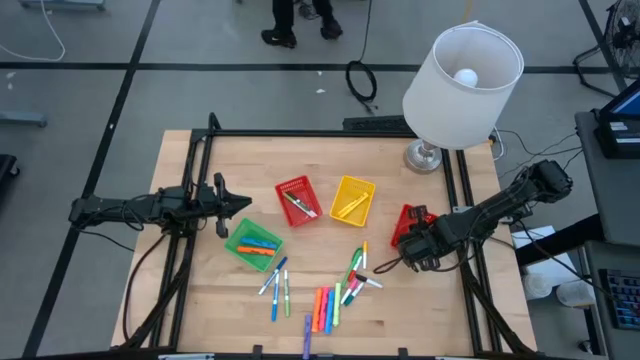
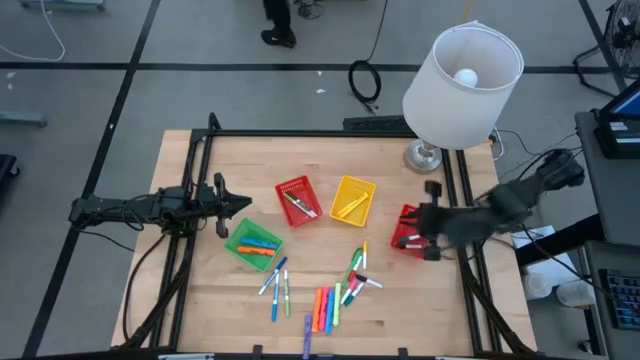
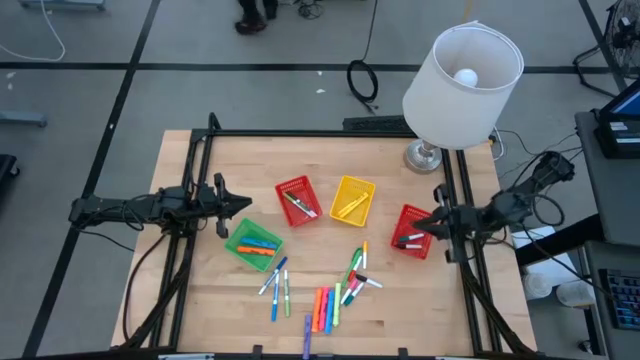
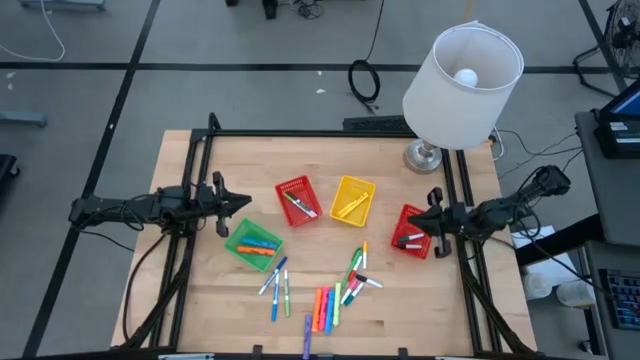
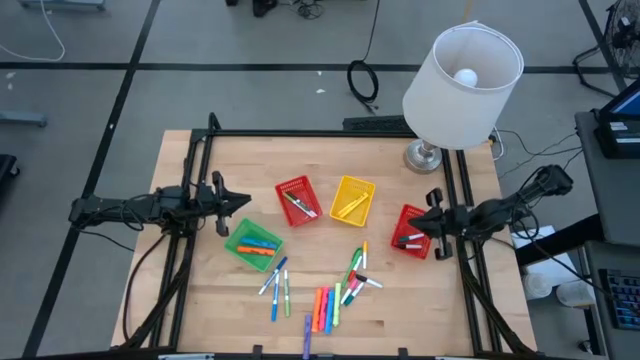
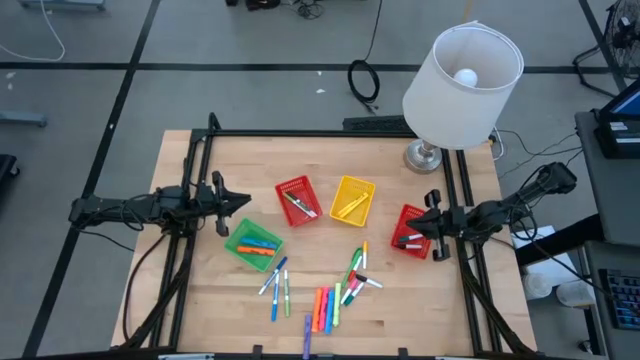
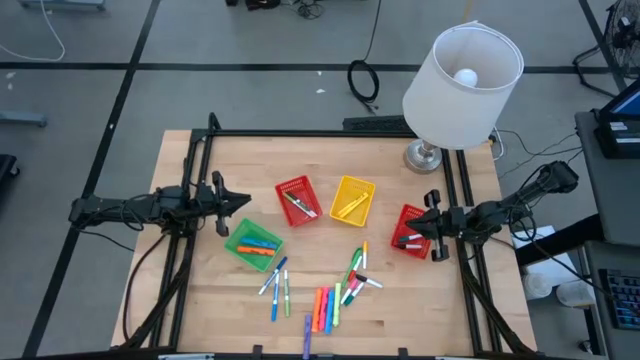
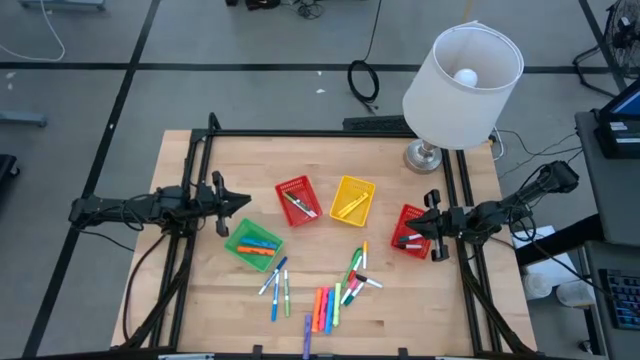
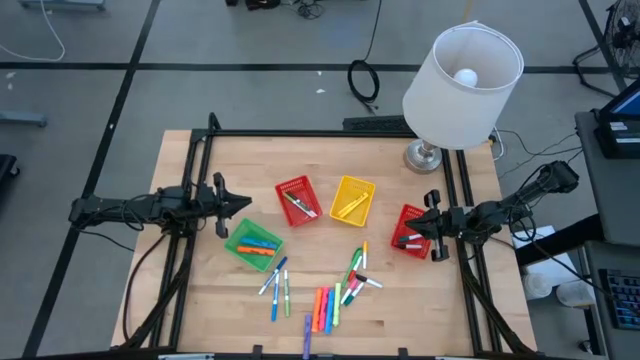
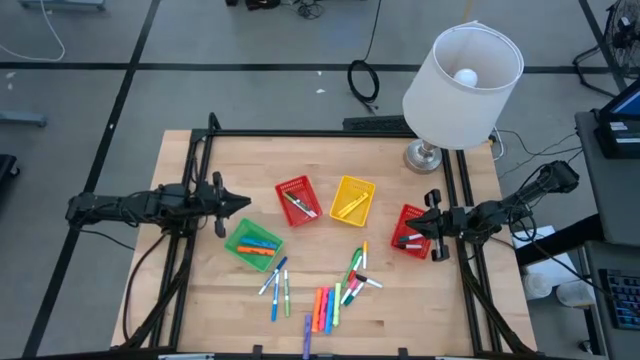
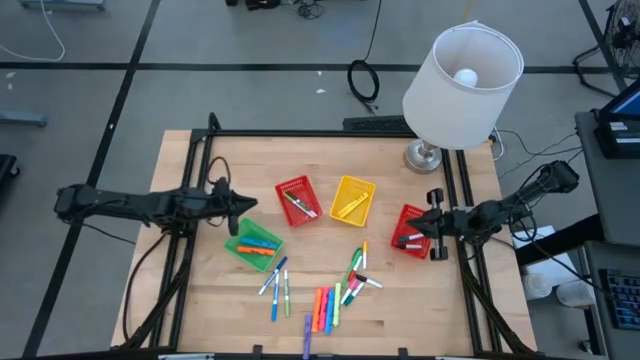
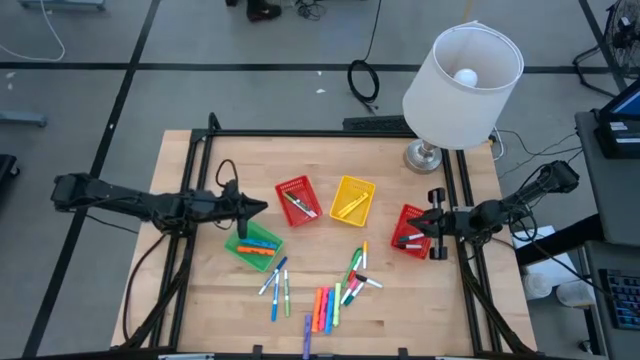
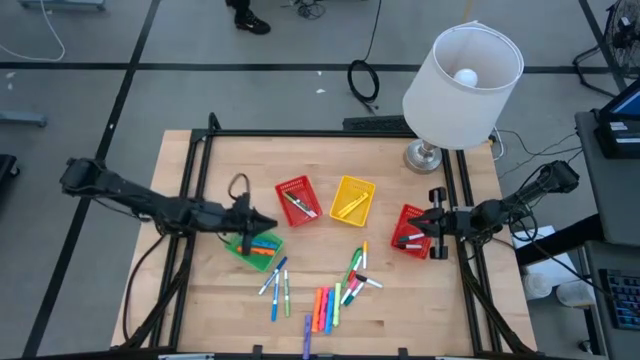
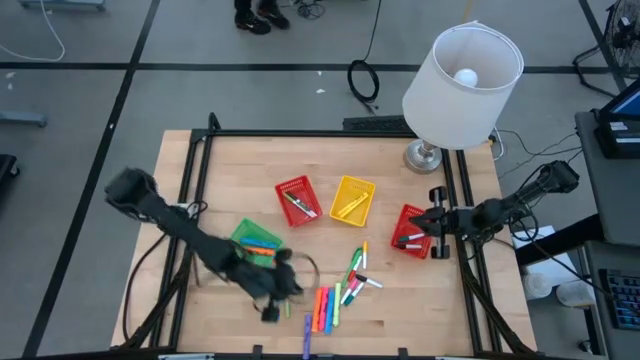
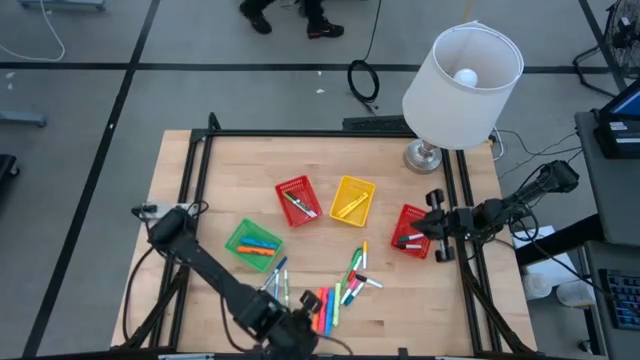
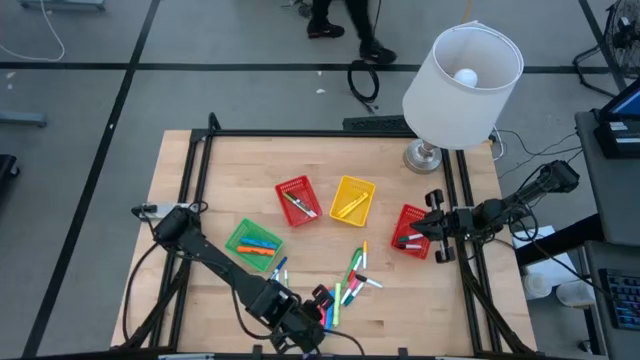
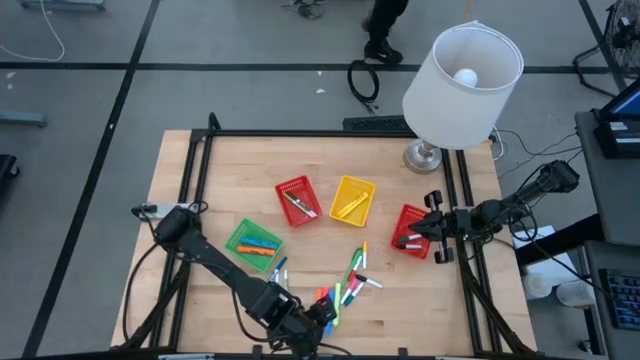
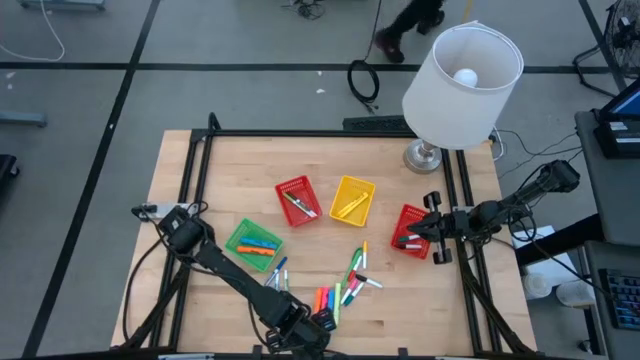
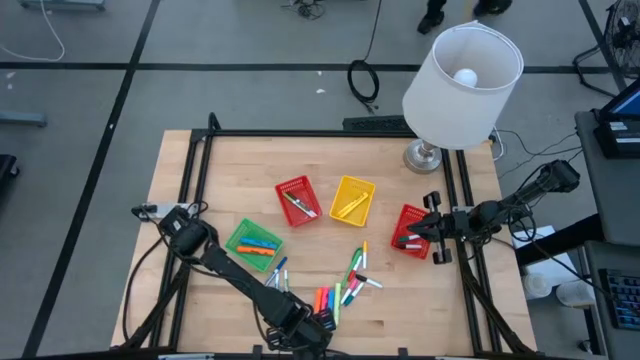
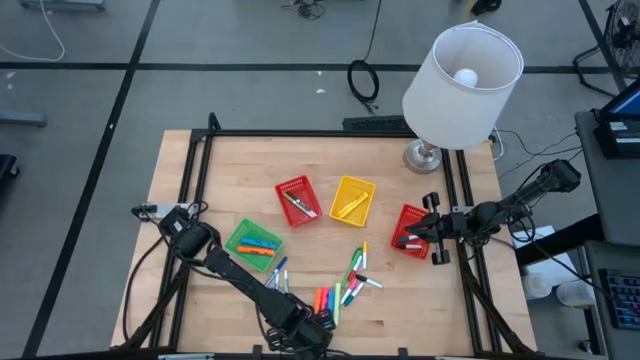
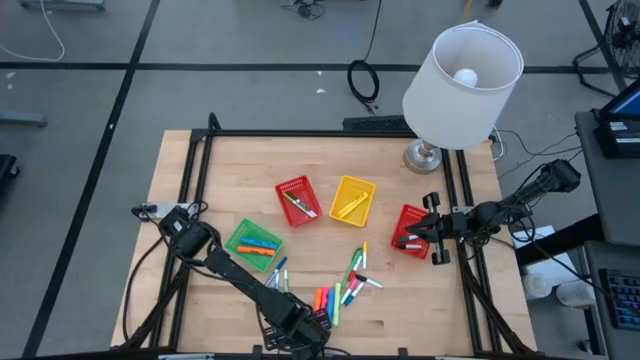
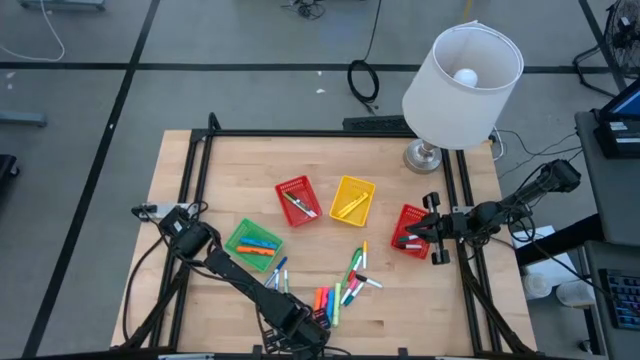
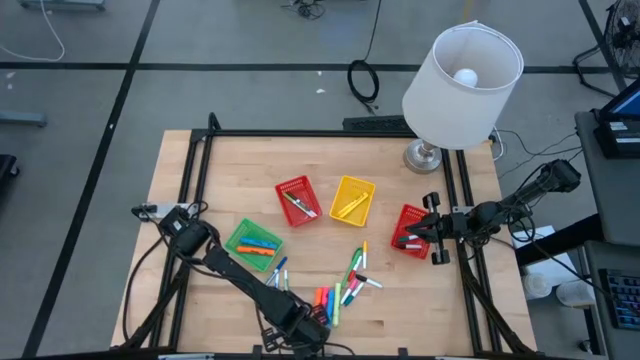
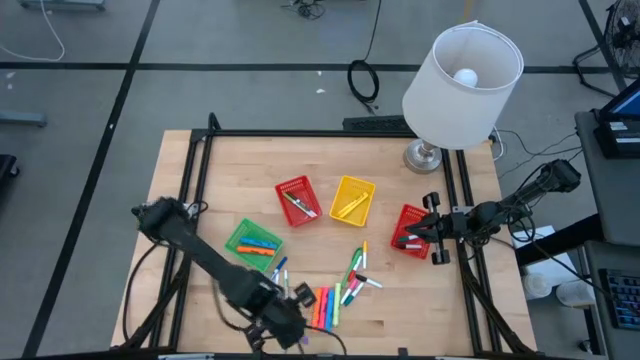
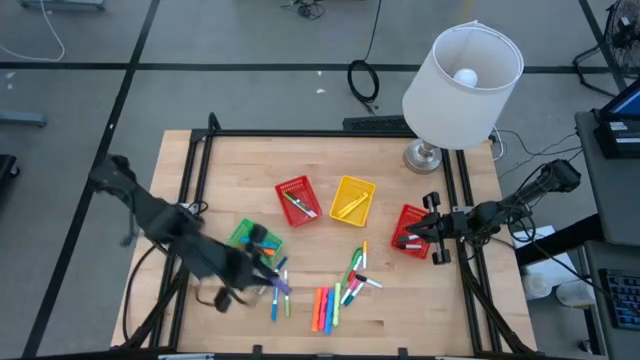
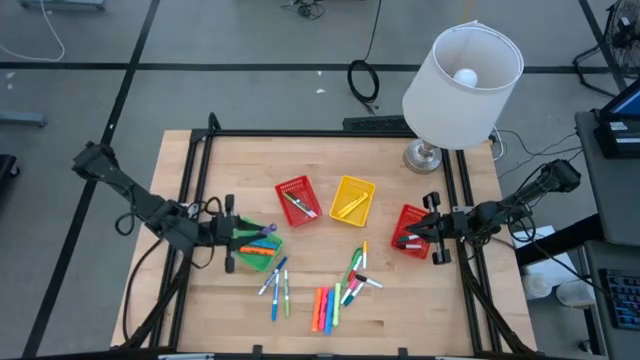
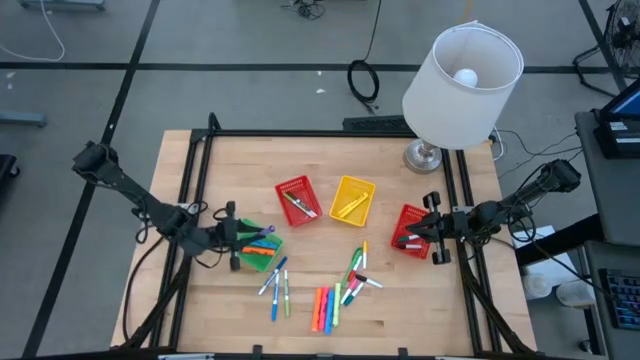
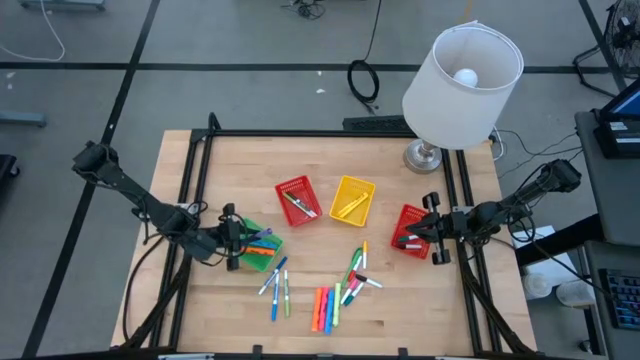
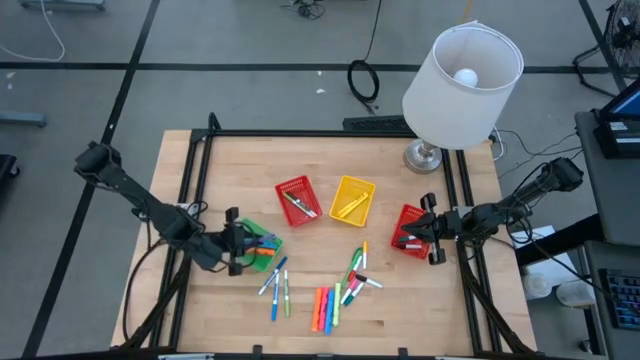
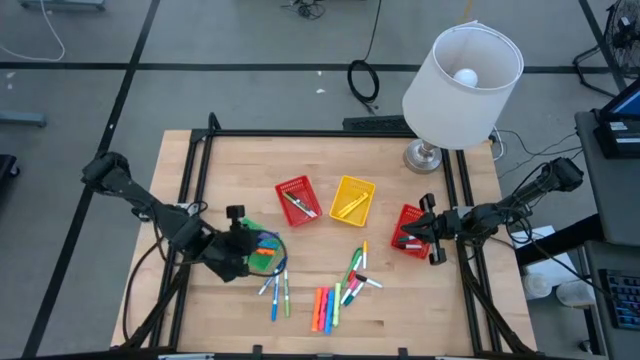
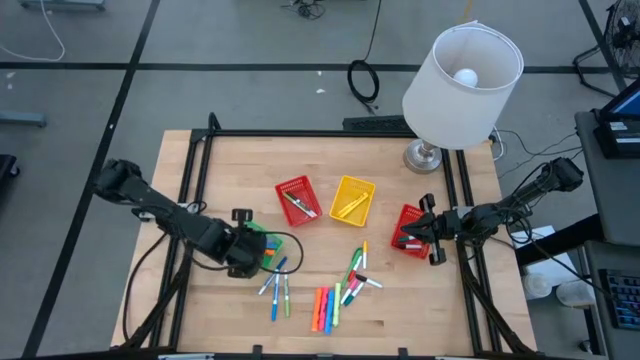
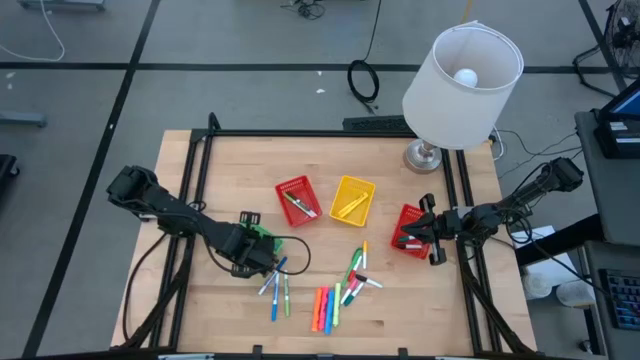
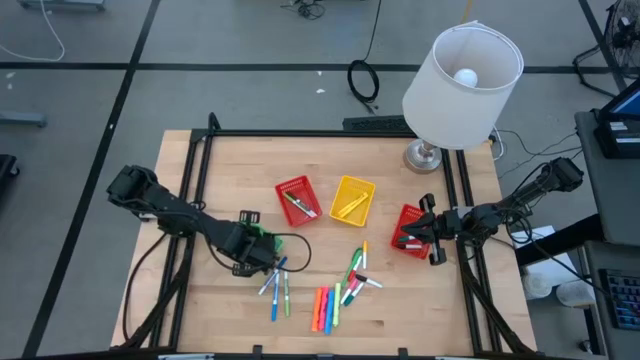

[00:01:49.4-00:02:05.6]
Task: Pick & Place Markers
Put the purple highlighter into the green bin

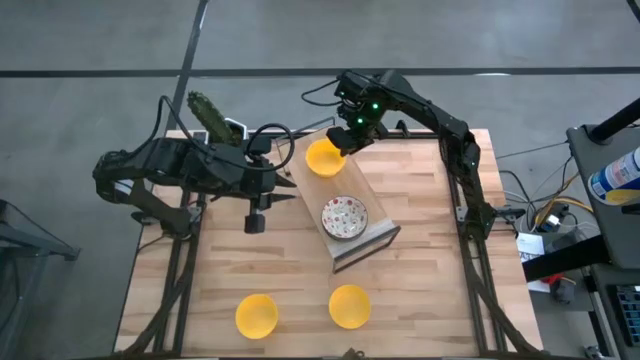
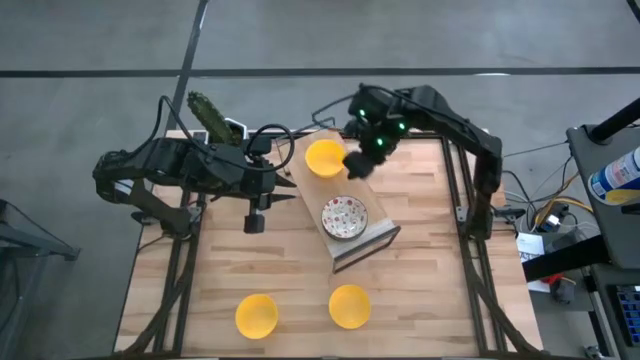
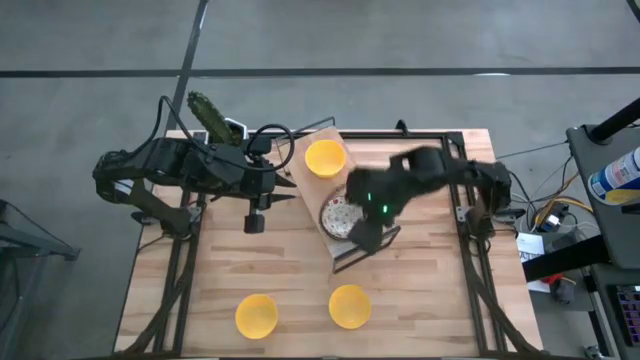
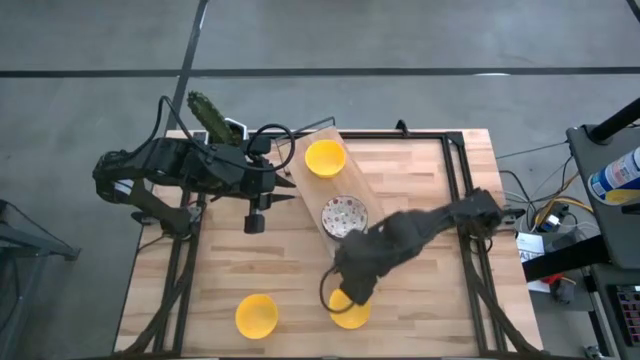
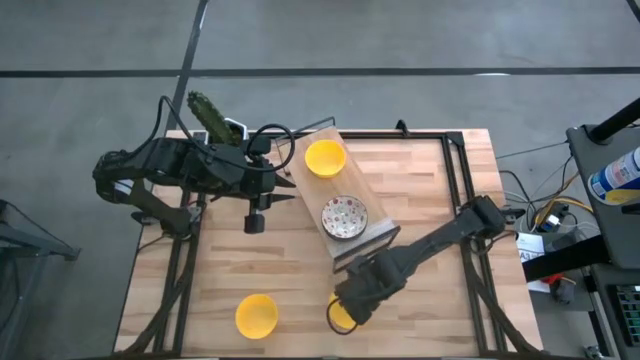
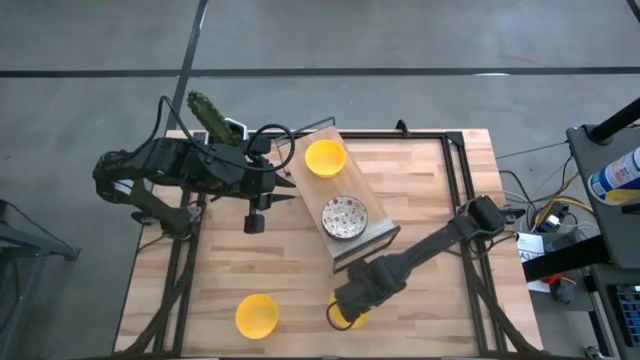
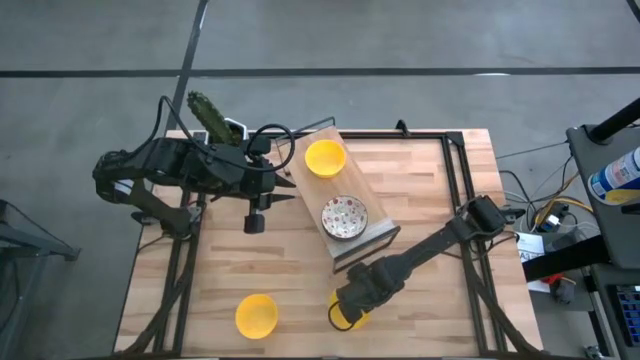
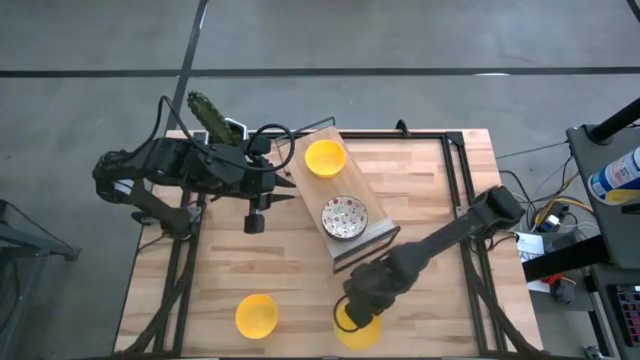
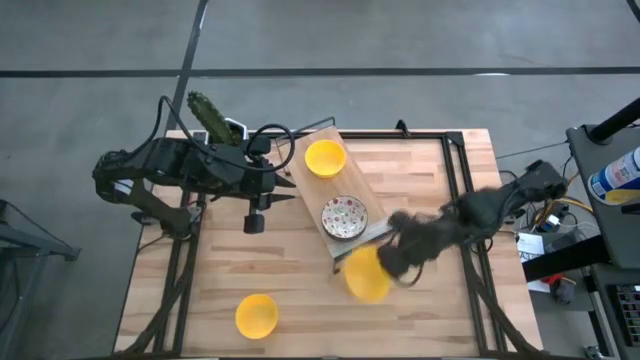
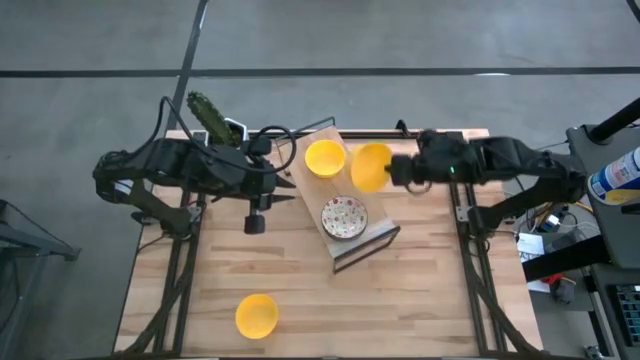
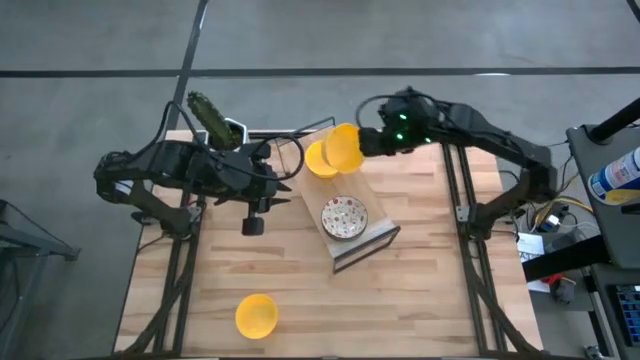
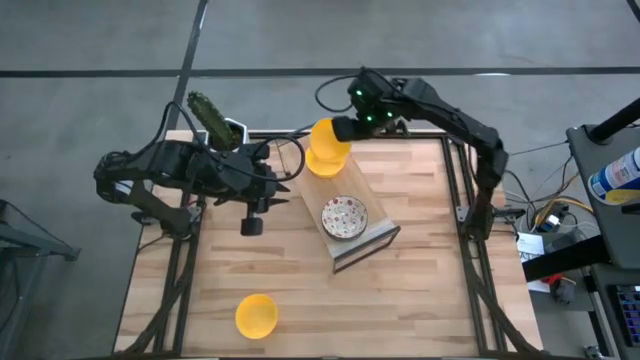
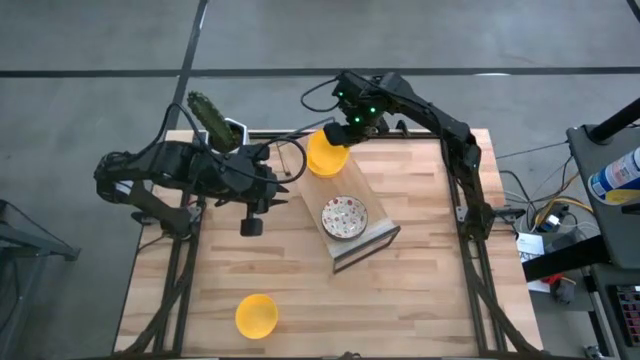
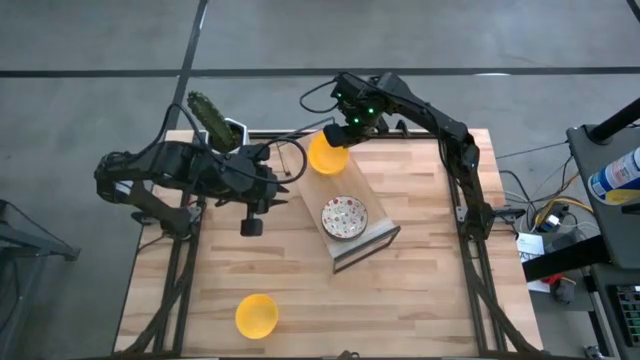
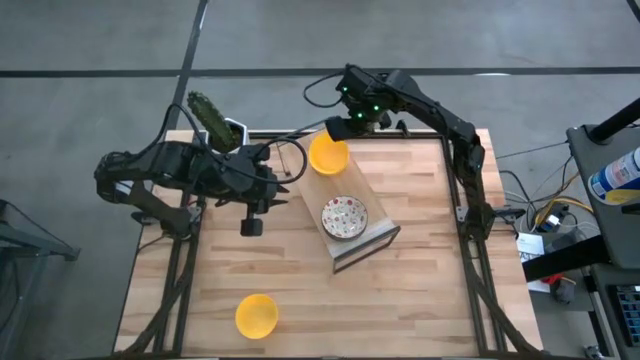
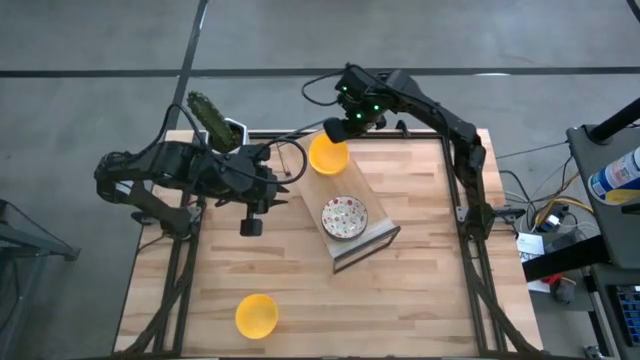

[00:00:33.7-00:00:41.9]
Task: Pick & Place Mini bowls
Stack the right yellow bowl on the other yellow bowl on the shelf
